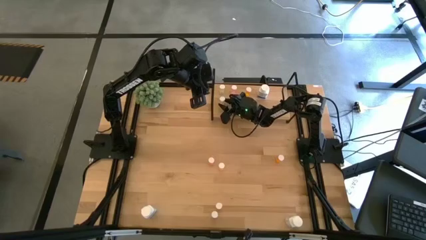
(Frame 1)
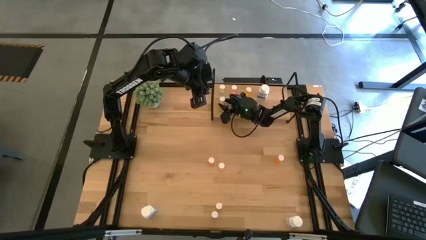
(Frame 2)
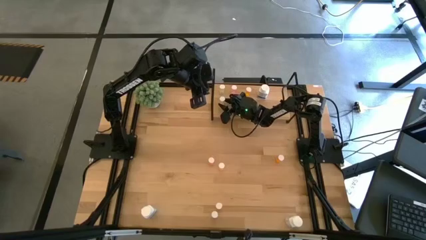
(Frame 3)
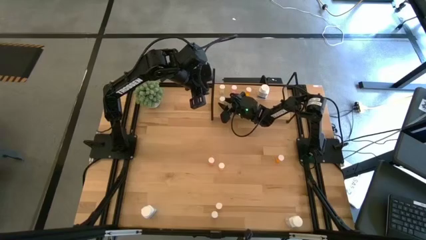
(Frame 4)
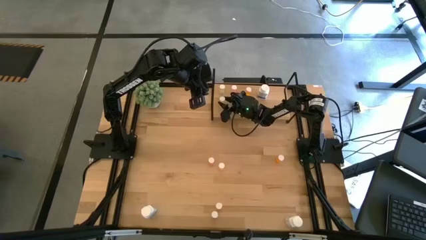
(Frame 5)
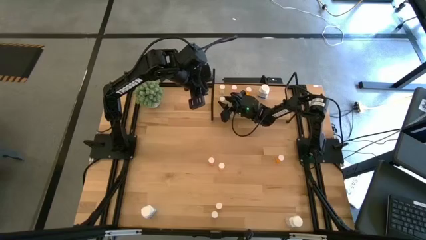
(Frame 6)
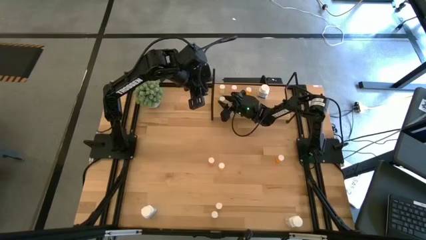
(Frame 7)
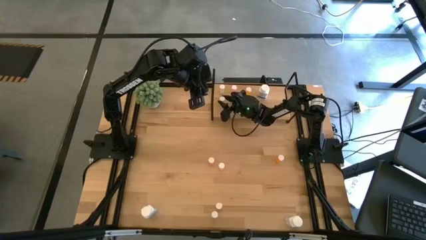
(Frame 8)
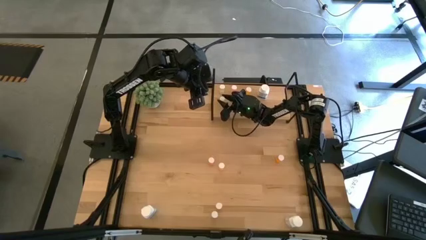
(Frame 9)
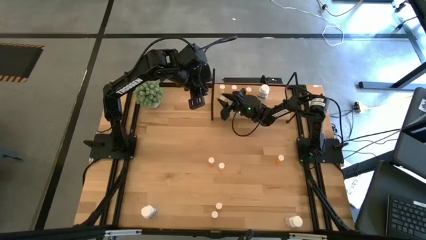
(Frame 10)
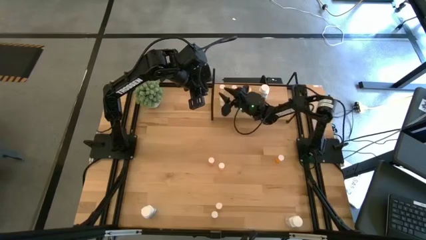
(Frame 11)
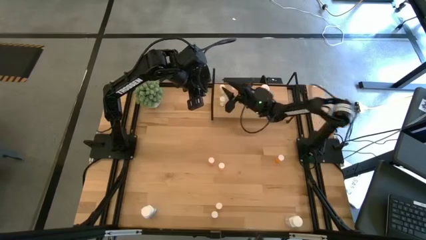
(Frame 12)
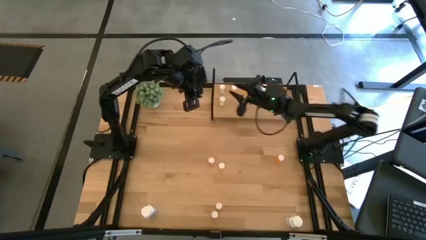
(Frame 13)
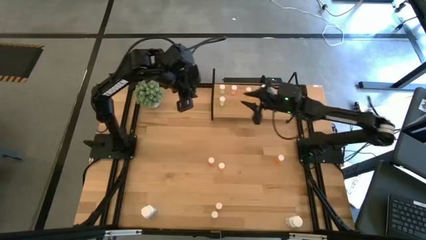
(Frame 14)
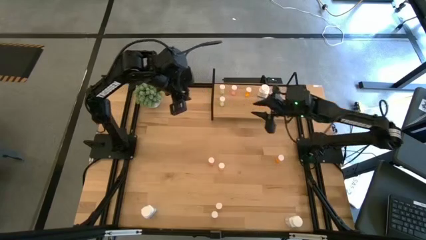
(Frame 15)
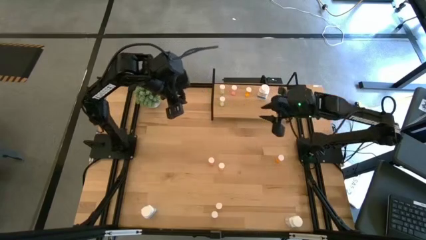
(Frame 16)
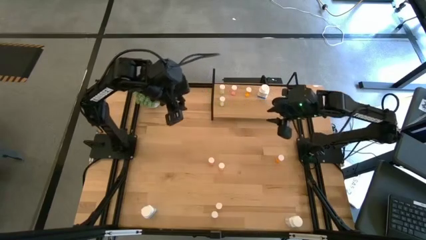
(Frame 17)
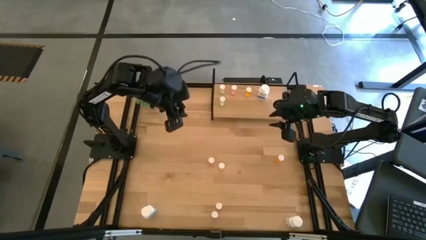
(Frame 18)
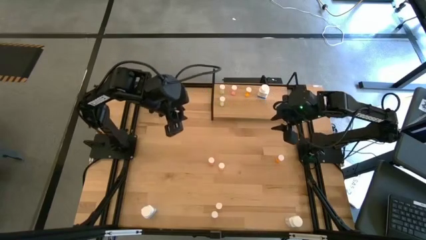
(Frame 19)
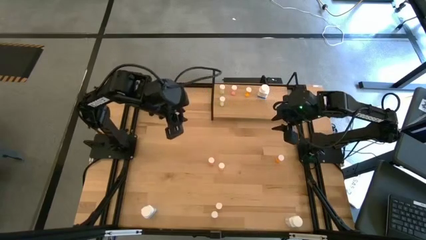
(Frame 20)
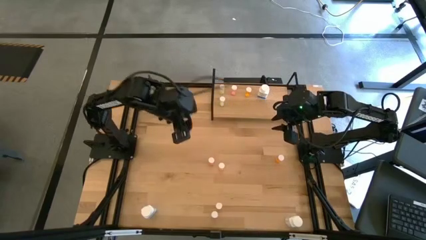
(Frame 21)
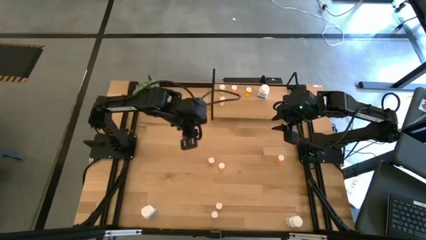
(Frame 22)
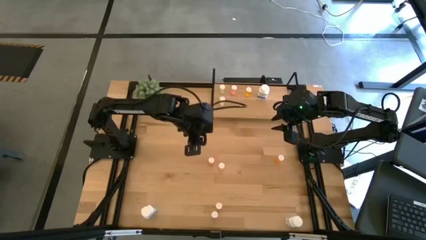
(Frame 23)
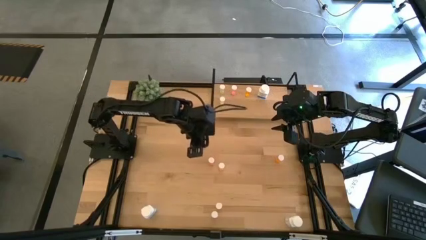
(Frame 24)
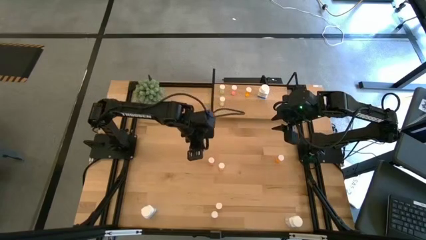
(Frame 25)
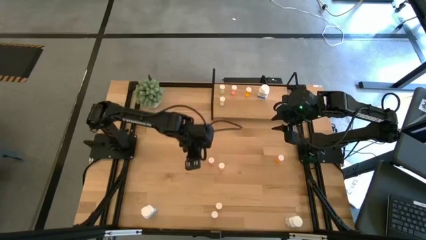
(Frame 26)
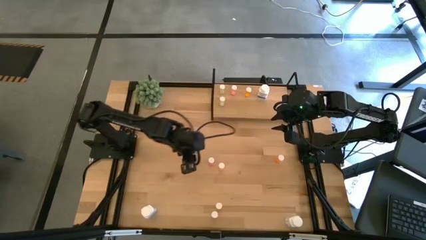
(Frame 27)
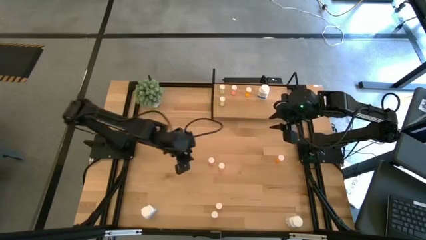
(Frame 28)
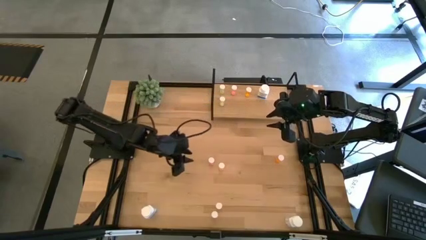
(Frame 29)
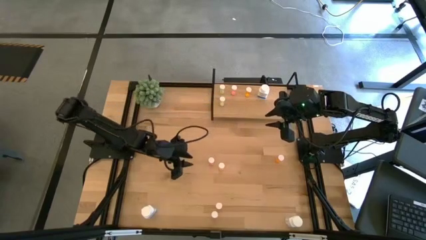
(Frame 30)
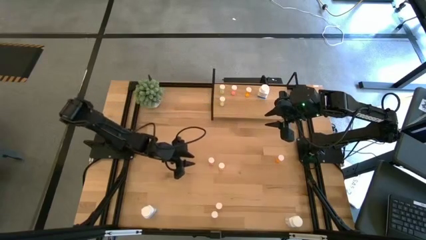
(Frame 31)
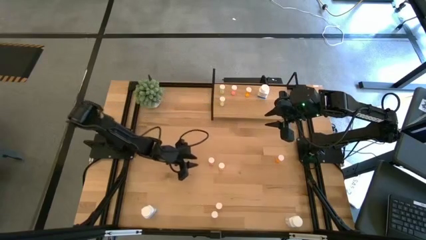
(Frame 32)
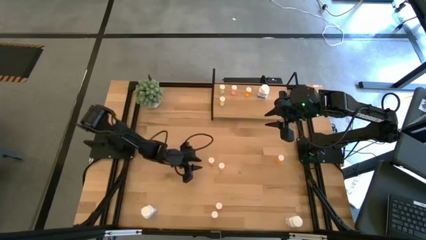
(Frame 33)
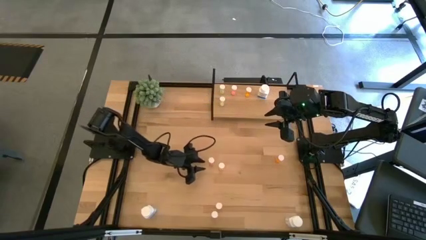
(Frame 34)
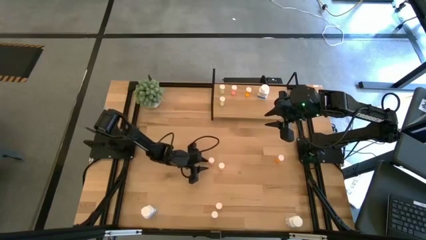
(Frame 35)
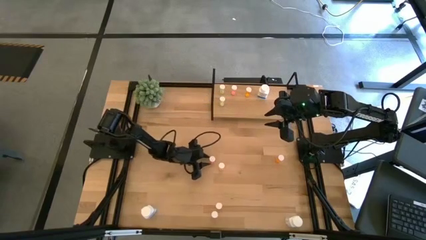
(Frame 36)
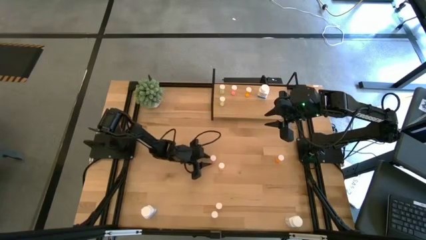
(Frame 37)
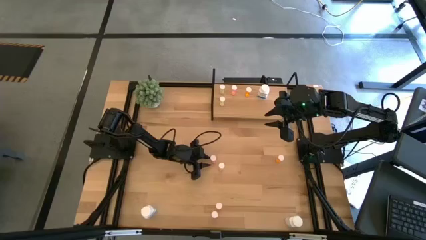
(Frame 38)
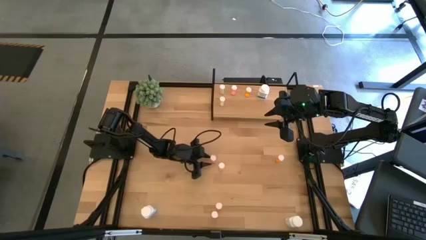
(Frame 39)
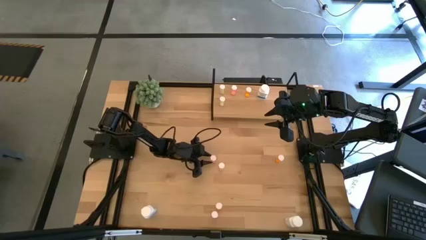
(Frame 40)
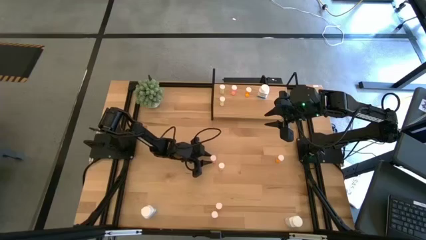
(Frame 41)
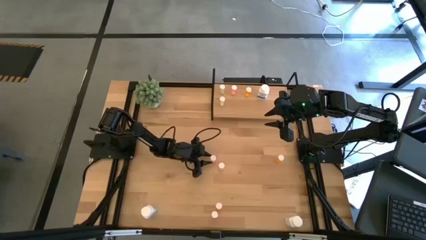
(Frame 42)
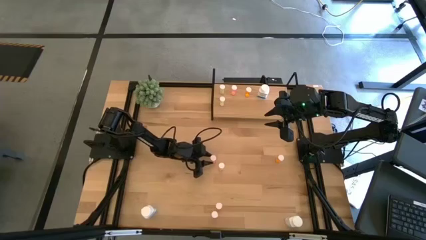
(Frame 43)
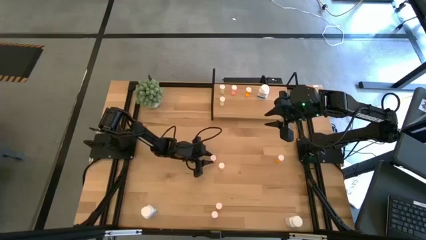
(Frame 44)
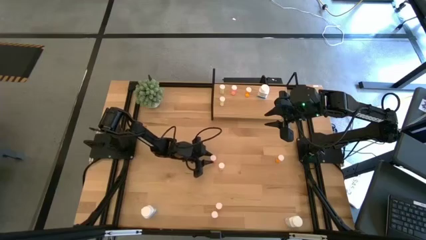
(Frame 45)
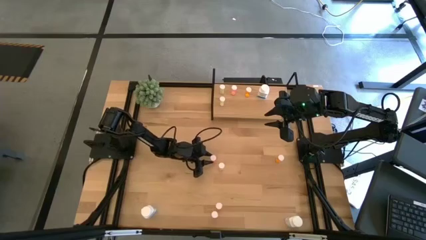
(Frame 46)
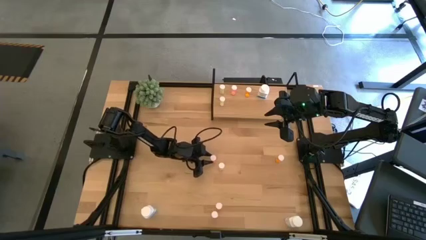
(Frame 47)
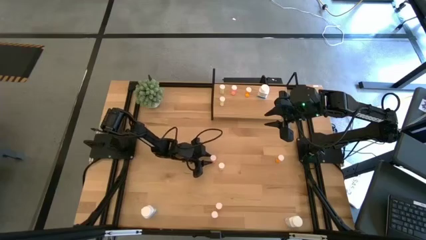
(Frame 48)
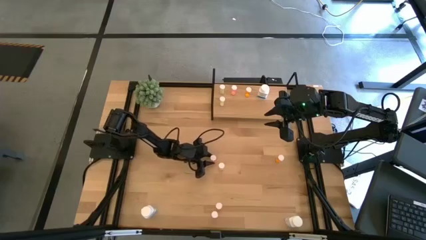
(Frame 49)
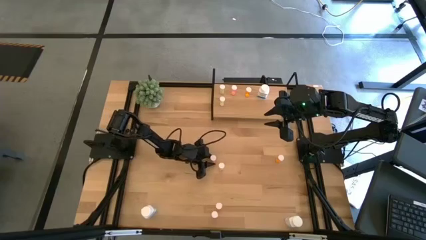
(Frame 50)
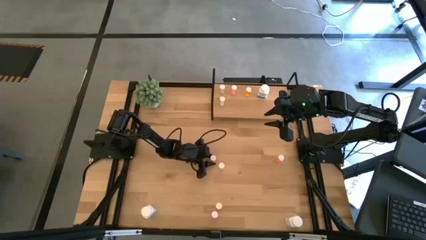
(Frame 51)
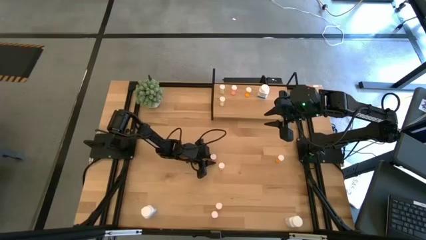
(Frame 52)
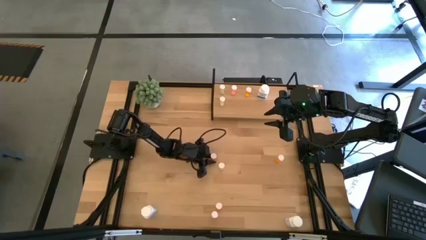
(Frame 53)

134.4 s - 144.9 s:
Task: Pick and place medicine bottles onto shelf by color
Put the top pink pill bottle on the shelf aligned with the other pink pill bottle

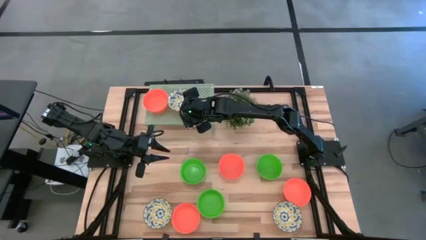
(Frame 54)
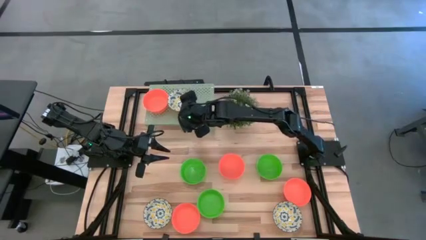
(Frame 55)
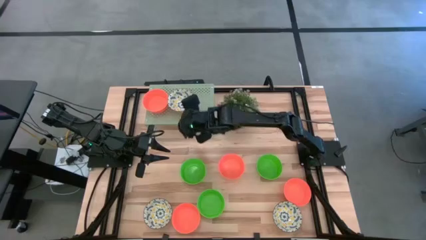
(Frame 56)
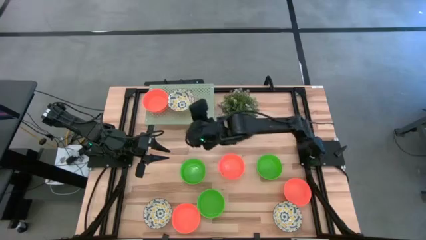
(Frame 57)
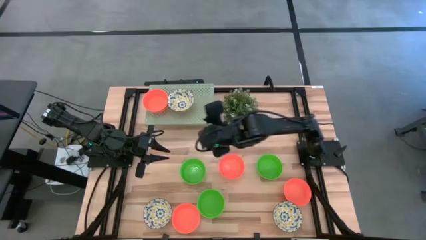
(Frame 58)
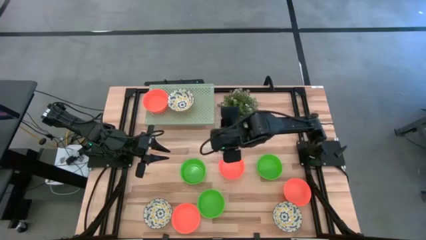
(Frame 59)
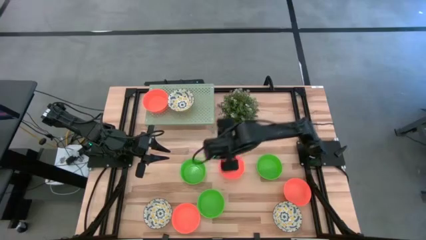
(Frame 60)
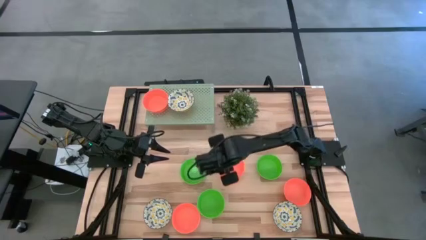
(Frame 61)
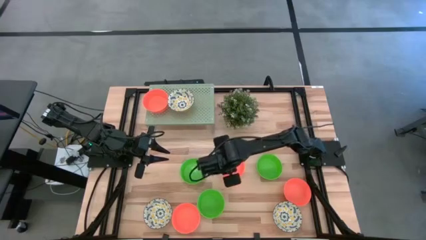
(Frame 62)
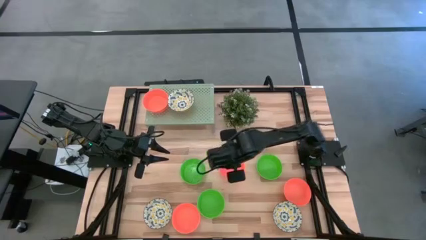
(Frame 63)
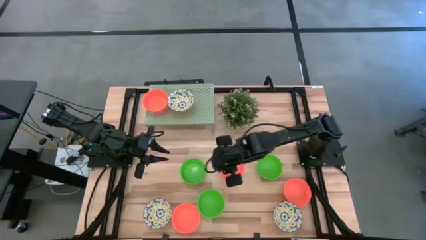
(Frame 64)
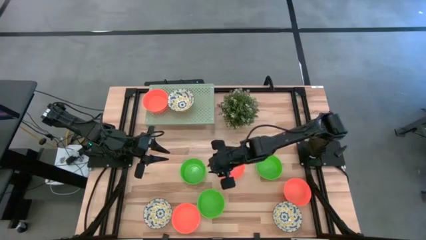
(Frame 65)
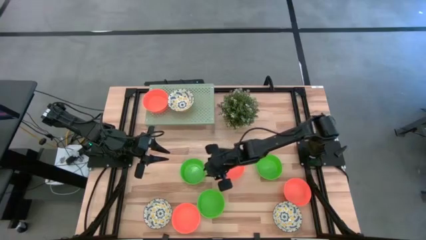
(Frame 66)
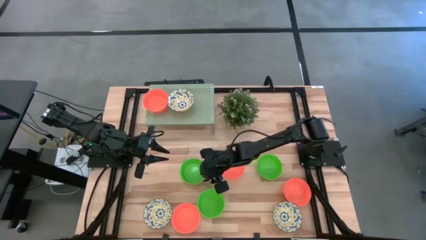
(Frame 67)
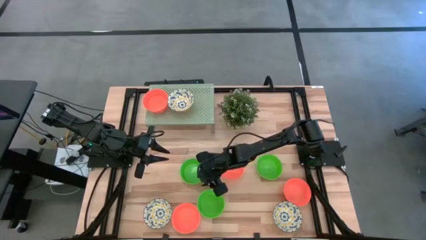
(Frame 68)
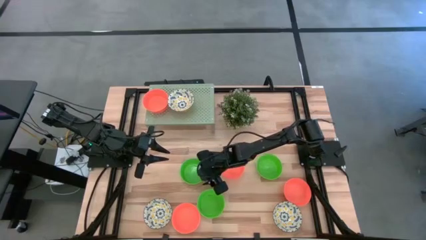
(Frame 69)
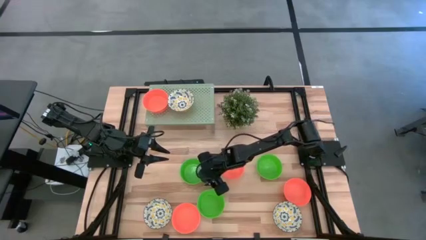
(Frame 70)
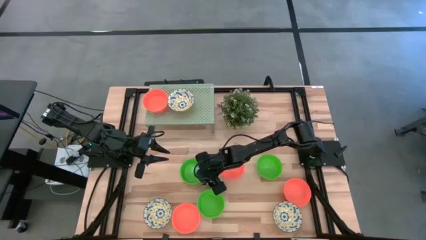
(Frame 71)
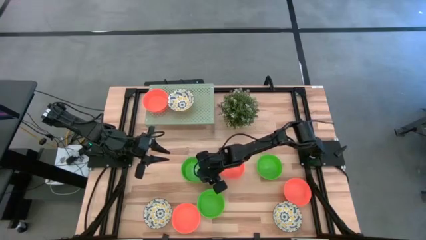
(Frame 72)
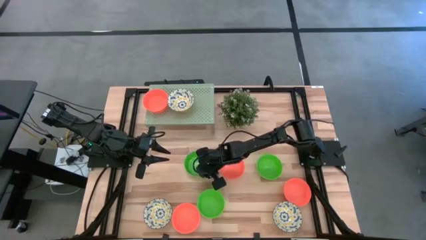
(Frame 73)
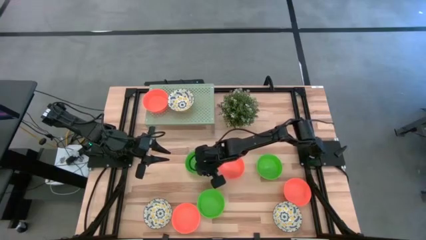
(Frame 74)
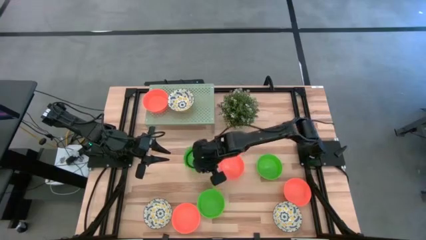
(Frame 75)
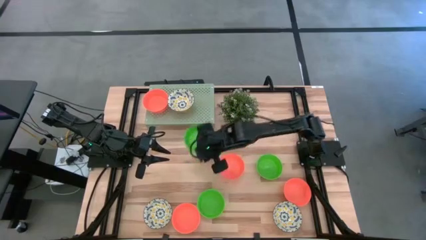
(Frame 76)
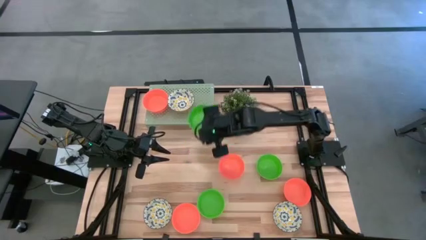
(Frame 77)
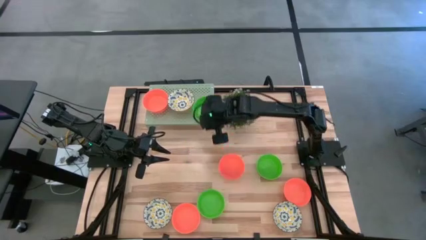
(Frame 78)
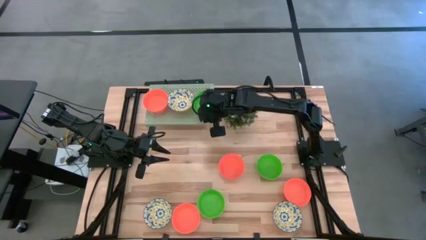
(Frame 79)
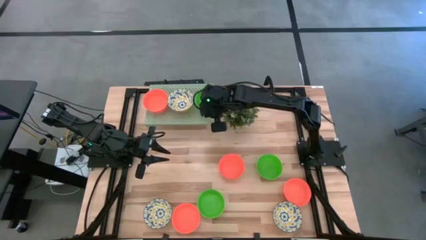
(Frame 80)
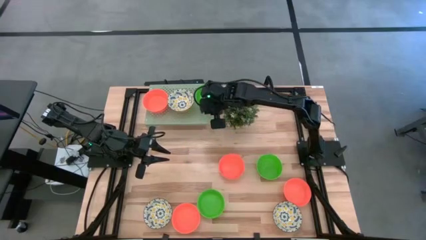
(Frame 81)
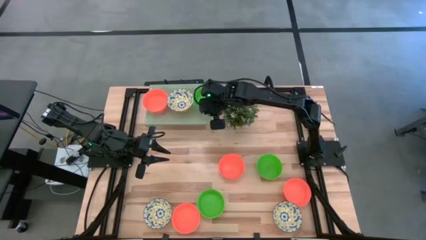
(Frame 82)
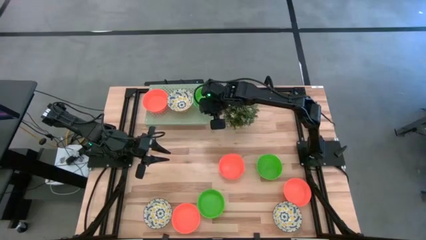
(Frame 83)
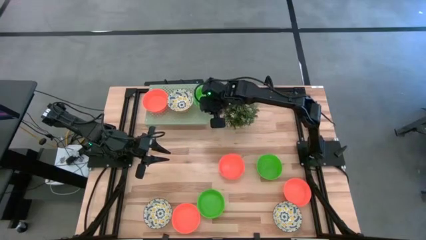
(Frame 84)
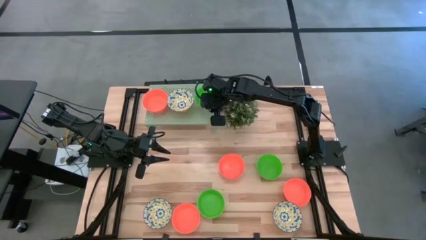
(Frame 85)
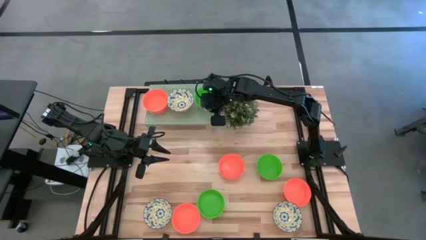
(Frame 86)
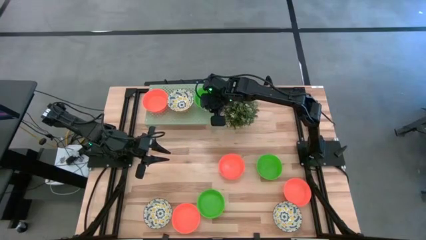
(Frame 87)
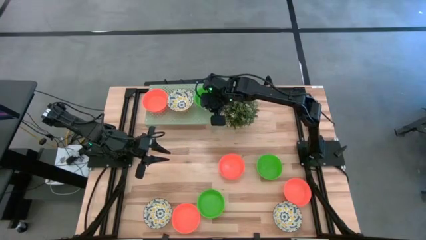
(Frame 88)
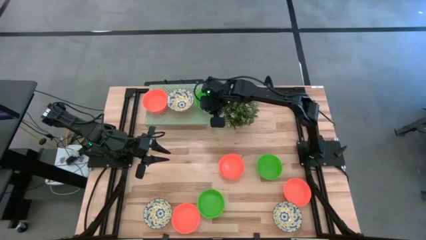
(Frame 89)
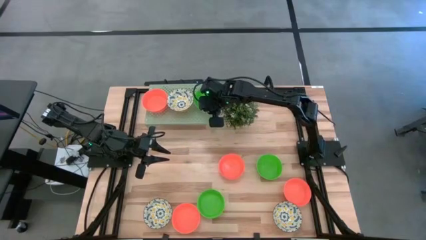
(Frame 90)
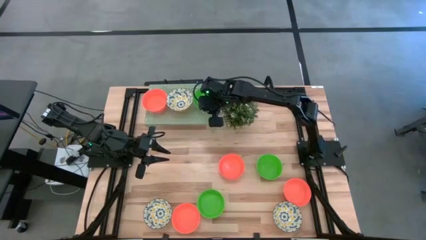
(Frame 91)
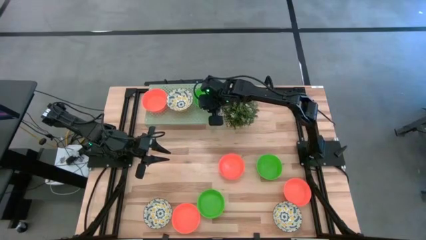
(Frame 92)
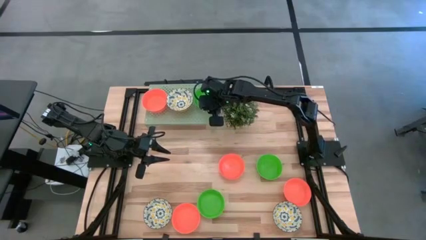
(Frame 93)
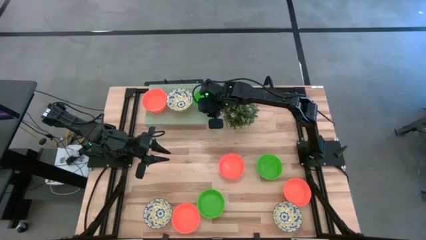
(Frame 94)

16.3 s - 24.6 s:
Task: Pick & Place Mini bowls
Put the top left green bowl on the shelf
